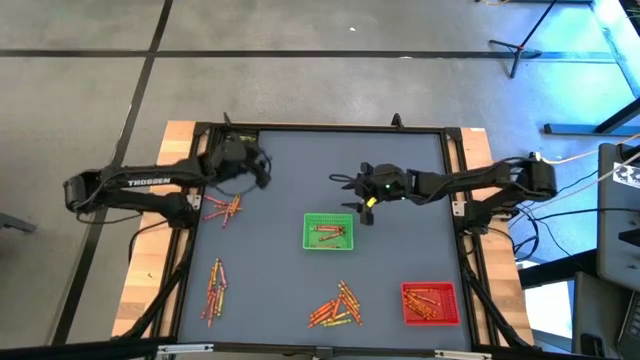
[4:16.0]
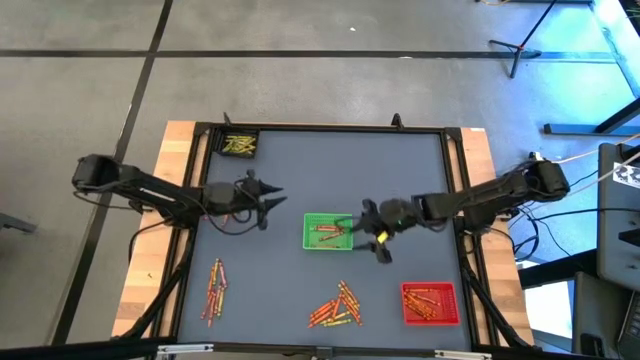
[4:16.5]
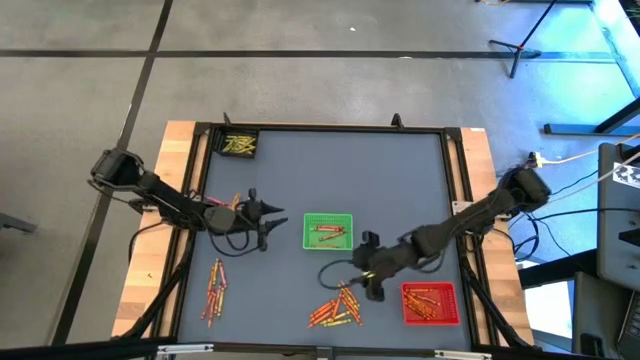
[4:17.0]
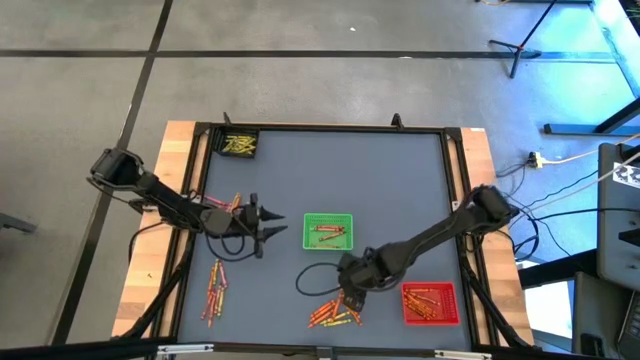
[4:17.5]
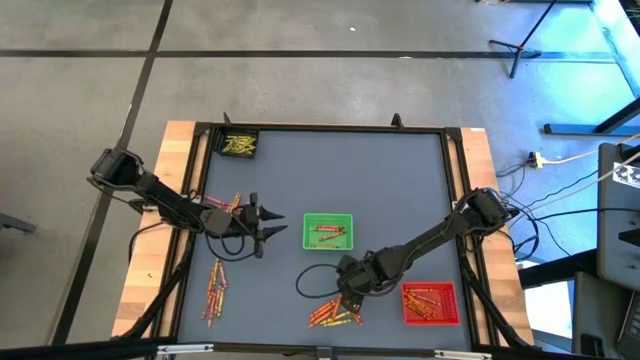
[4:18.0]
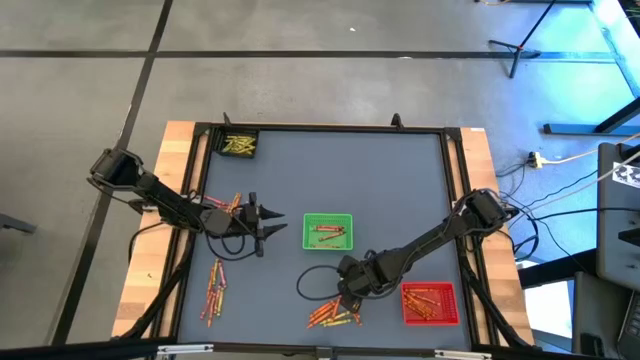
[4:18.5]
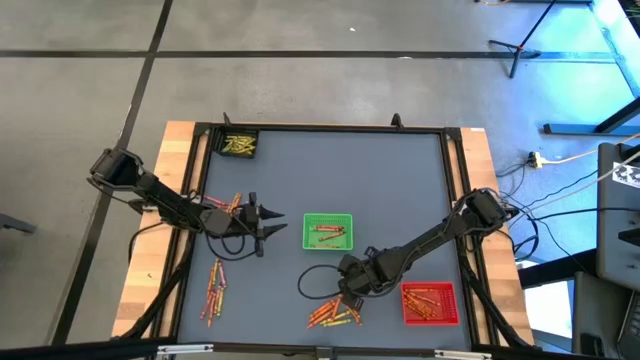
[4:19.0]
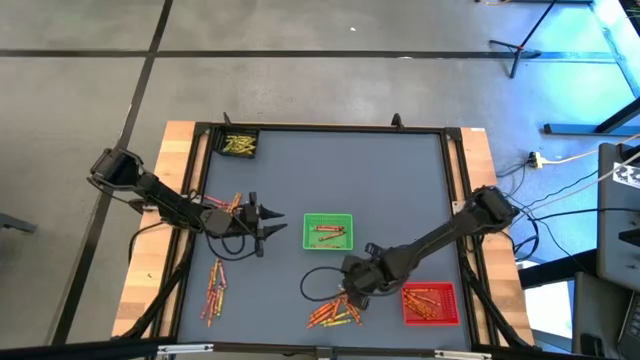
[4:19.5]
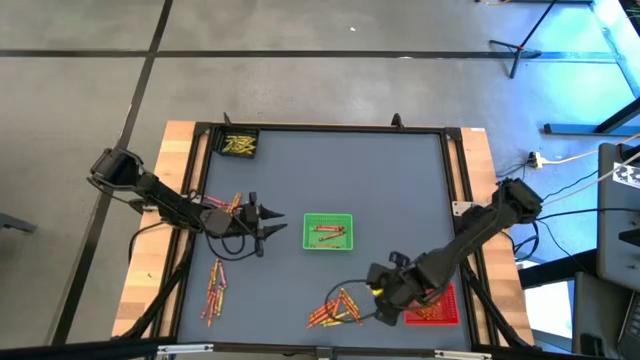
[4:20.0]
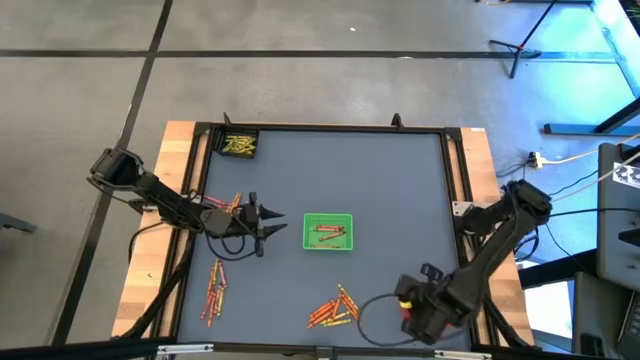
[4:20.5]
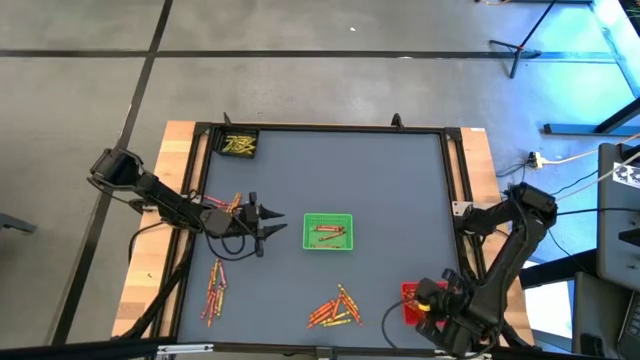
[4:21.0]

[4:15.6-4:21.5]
Task: Sort crayons
Put the orange crayon into the red bin

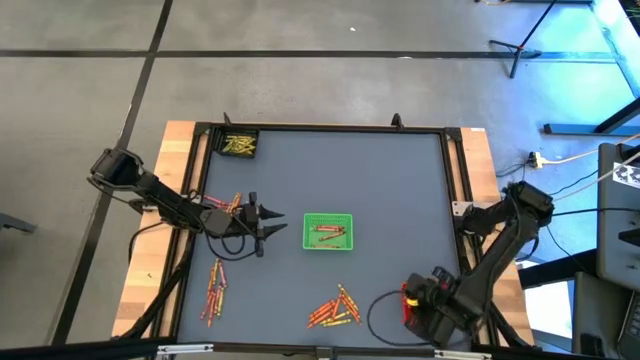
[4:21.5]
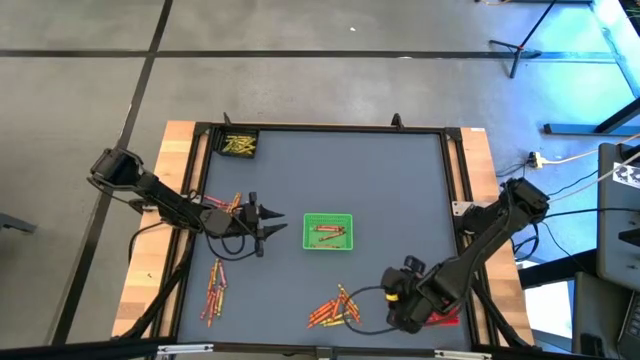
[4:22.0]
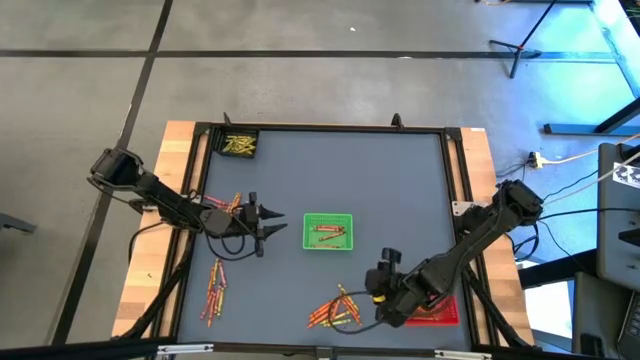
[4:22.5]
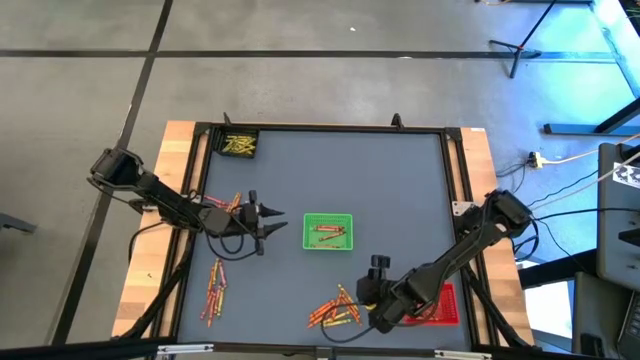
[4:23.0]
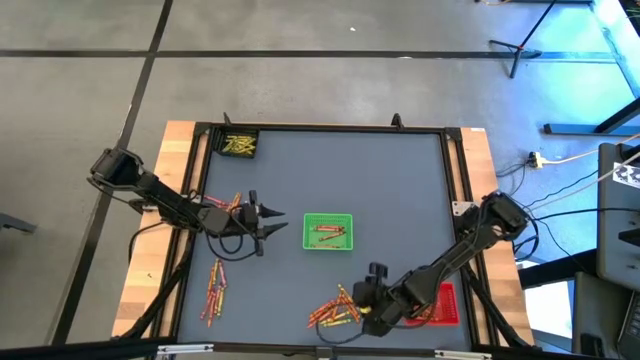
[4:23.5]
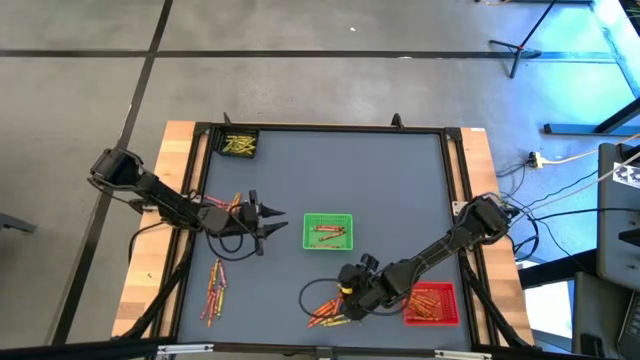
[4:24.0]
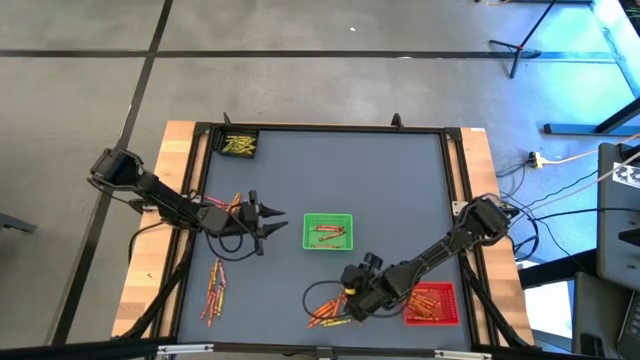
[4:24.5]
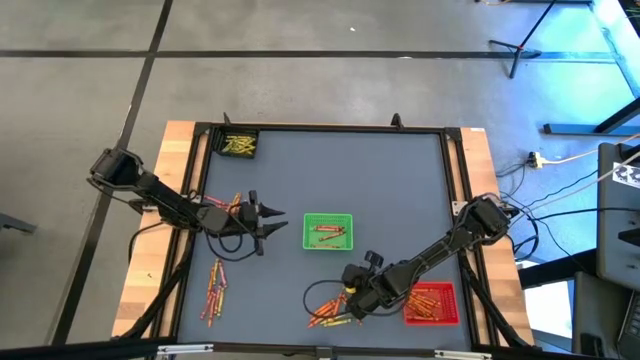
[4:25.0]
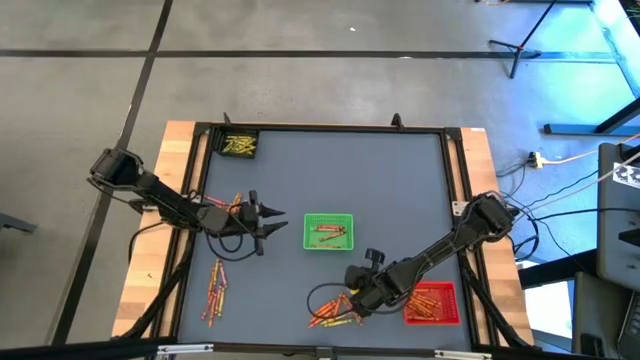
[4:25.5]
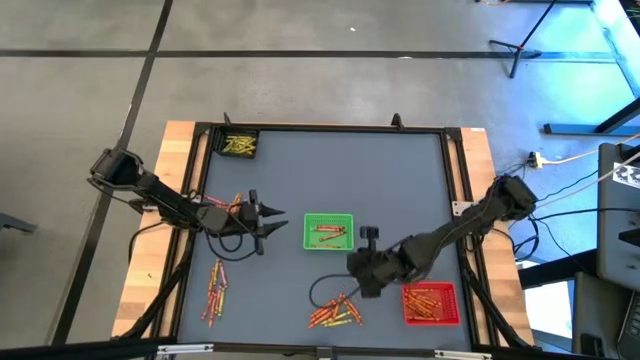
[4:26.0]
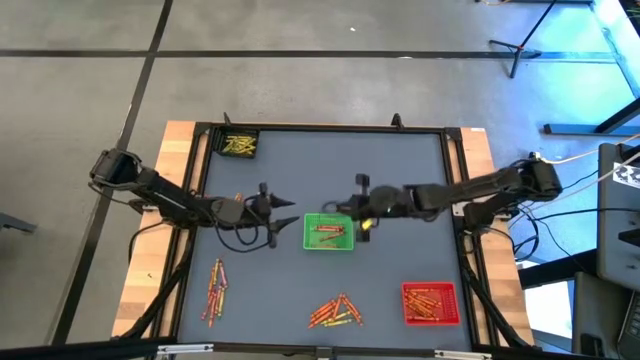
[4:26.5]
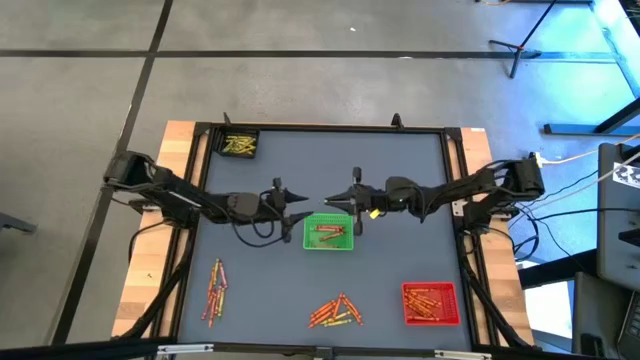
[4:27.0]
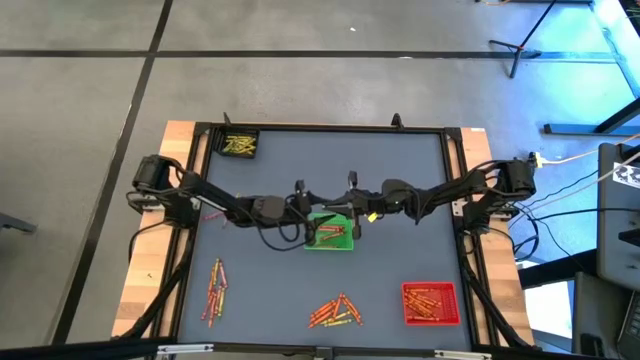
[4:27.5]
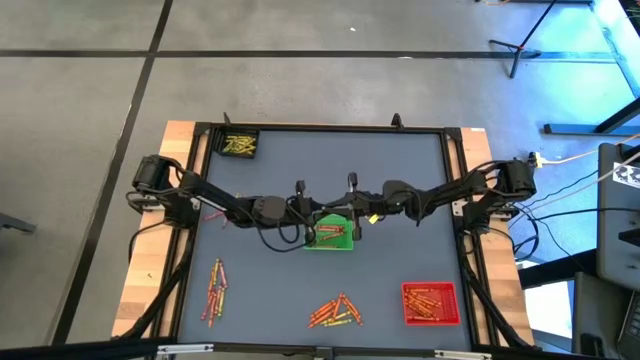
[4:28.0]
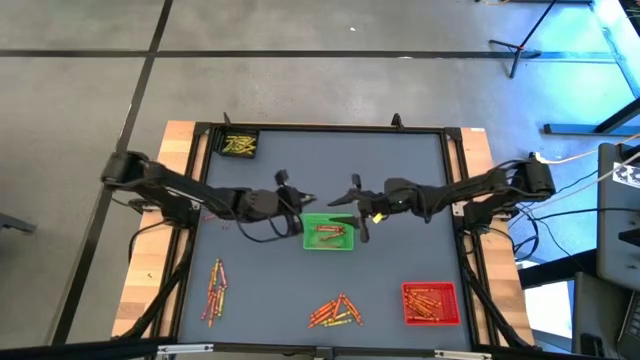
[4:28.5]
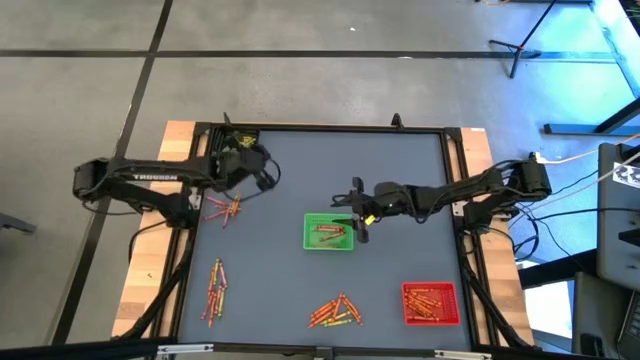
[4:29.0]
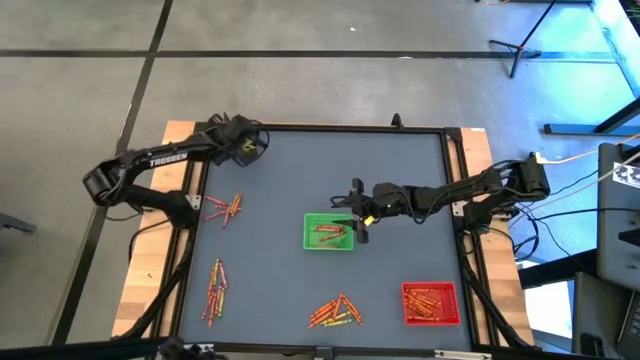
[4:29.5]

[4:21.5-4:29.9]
Put the light green crayon into the black bin

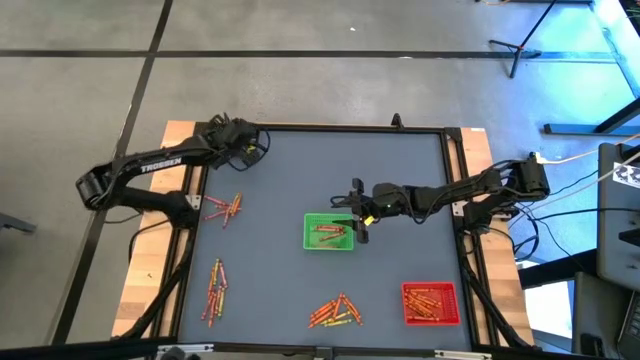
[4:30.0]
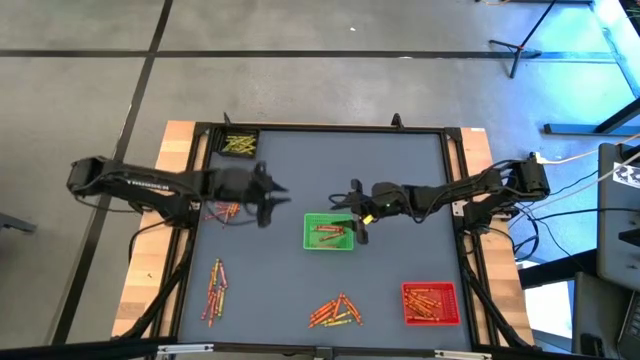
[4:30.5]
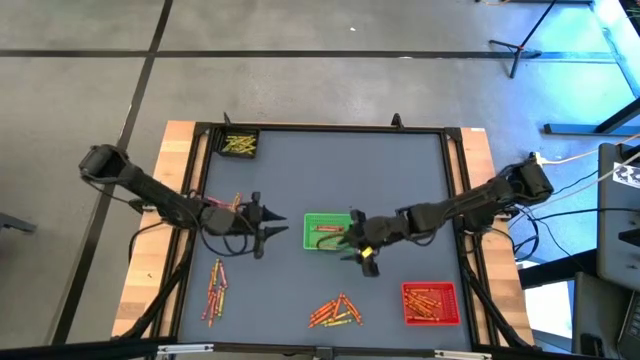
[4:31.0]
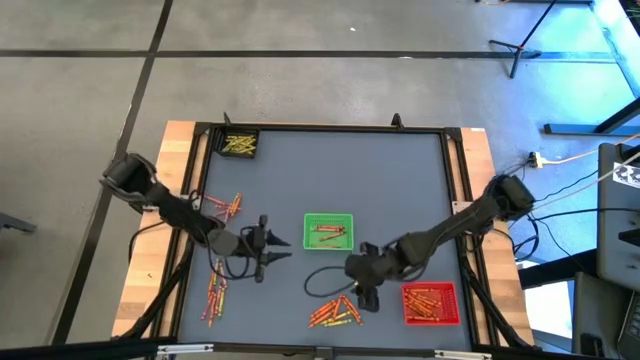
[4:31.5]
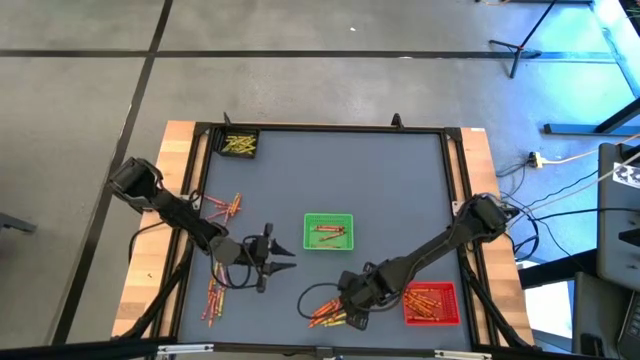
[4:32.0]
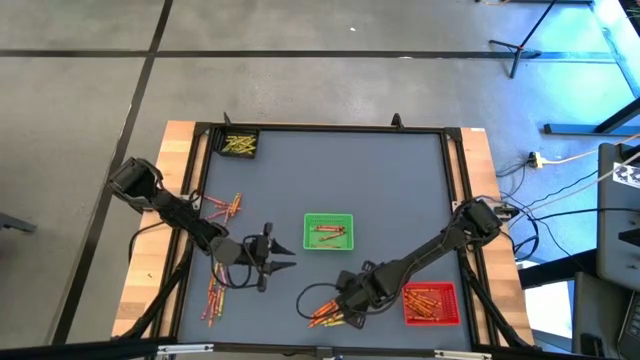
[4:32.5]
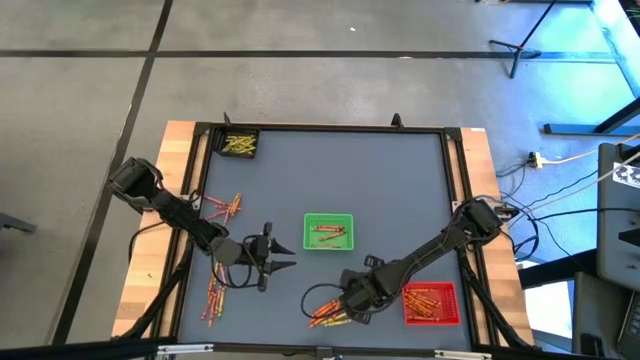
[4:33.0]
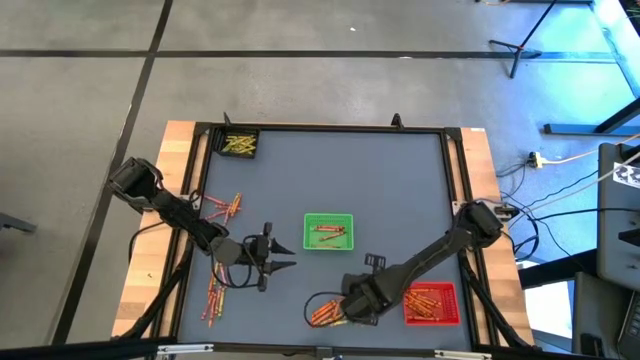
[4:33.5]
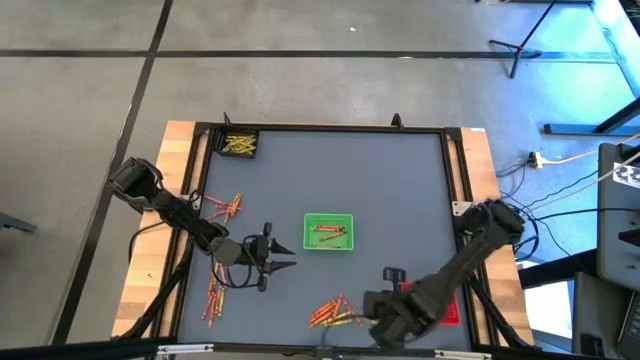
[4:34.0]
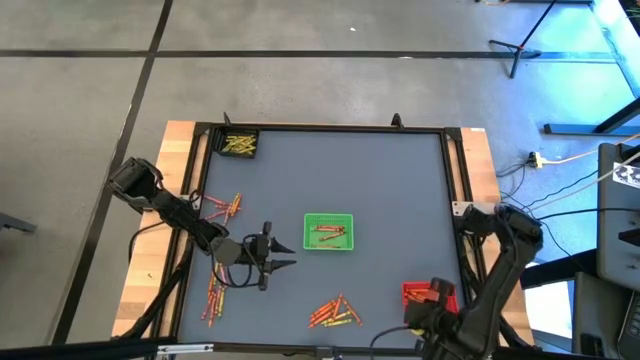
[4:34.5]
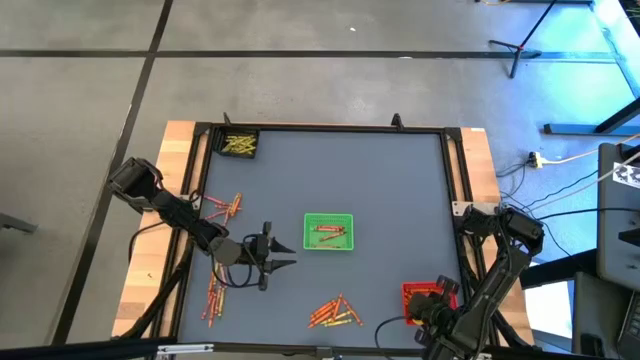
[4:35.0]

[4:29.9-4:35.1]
Put the orange crayon into the red bin

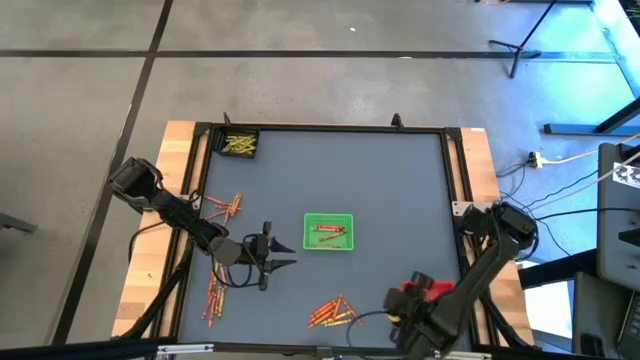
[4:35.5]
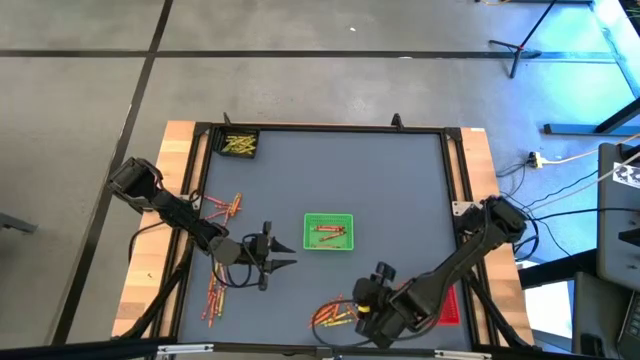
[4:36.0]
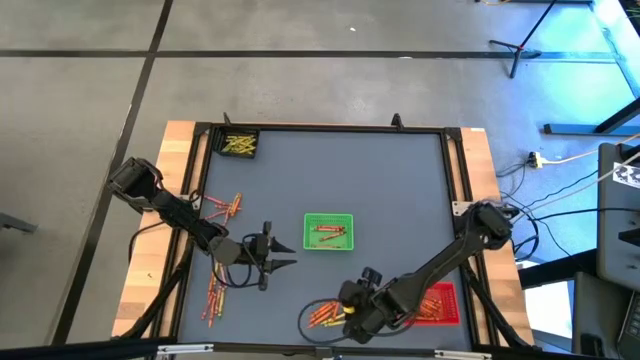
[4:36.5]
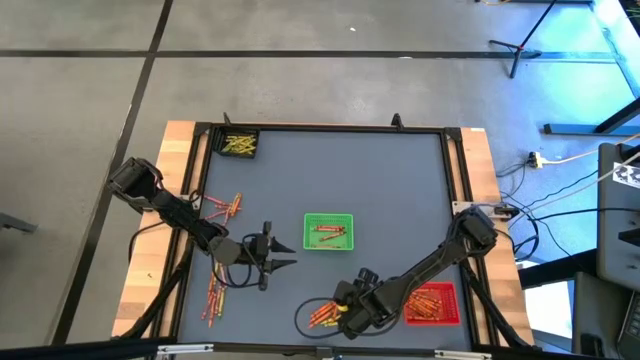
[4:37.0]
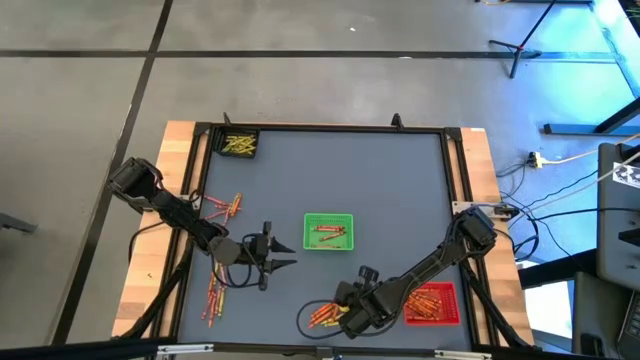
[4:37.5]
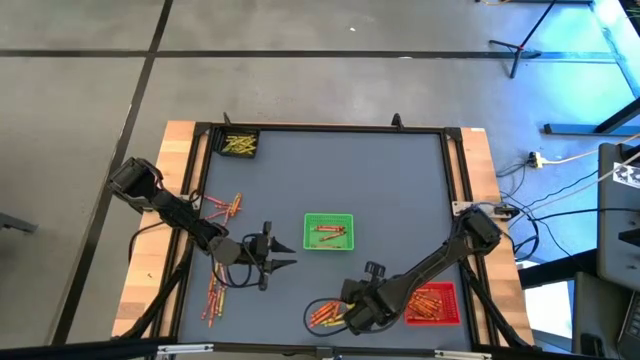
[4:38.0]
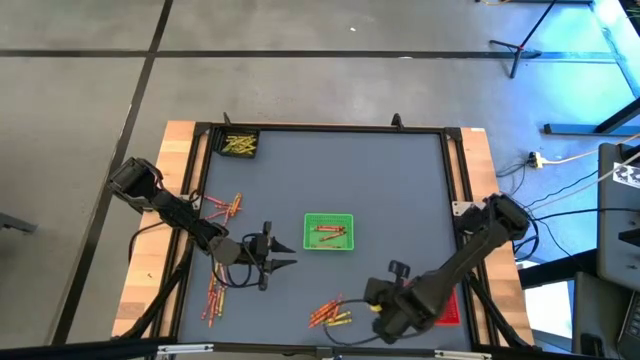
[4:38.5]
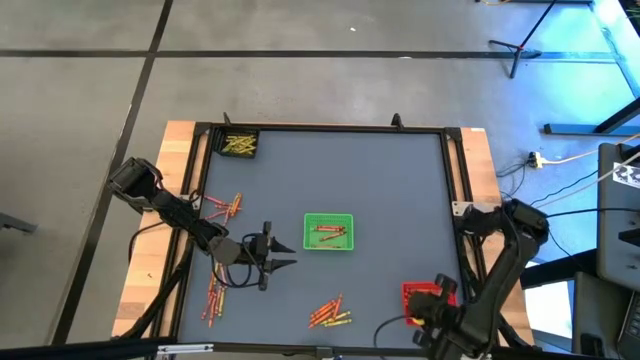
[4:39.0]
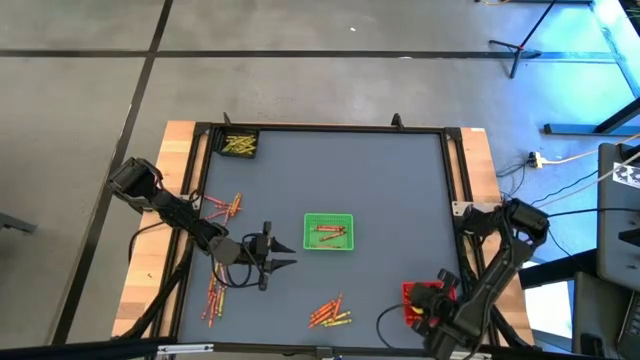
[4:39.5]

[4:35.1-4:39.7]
Put the orange crayon into the red bin
